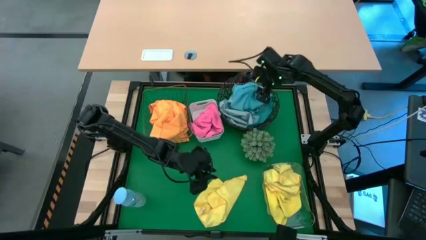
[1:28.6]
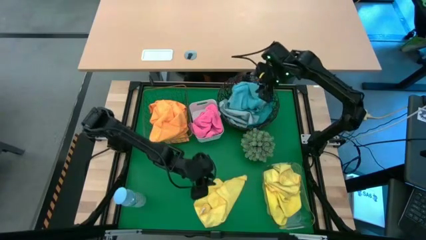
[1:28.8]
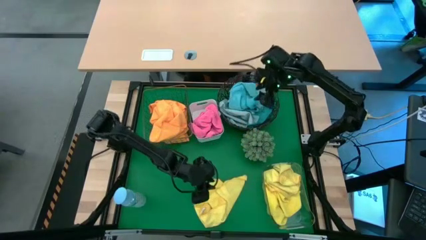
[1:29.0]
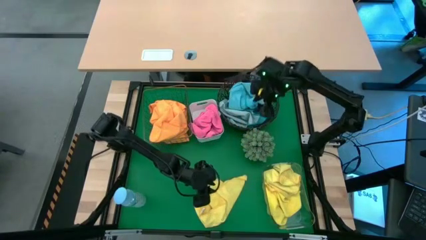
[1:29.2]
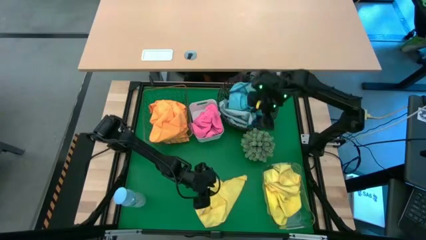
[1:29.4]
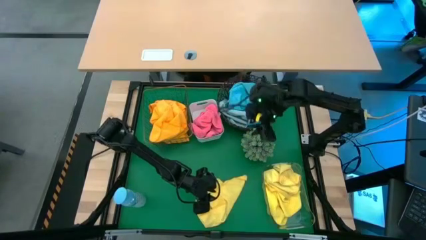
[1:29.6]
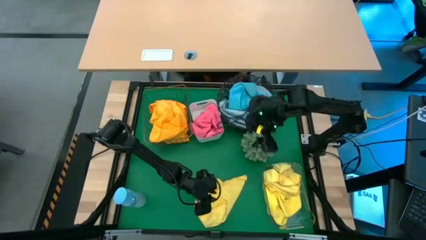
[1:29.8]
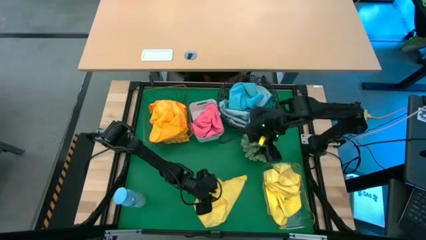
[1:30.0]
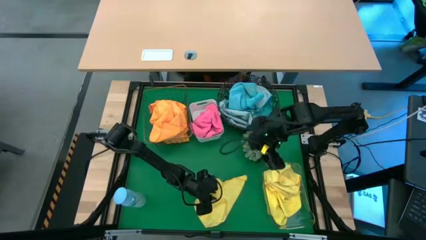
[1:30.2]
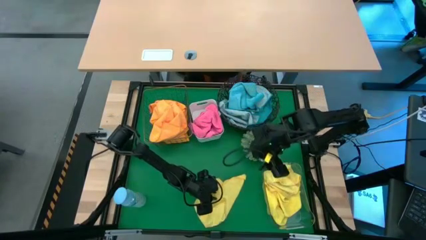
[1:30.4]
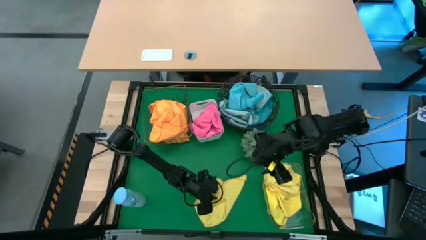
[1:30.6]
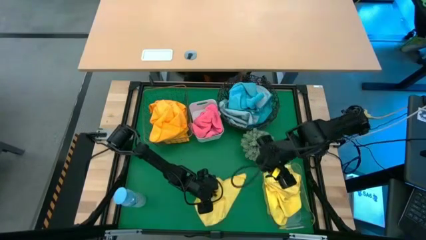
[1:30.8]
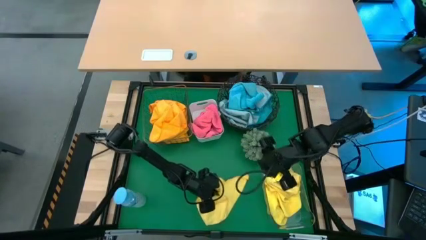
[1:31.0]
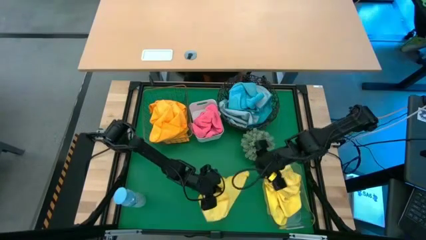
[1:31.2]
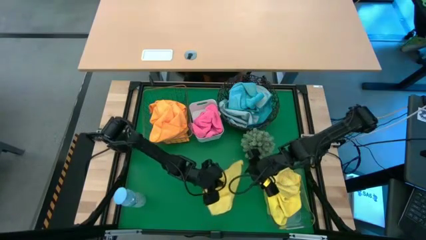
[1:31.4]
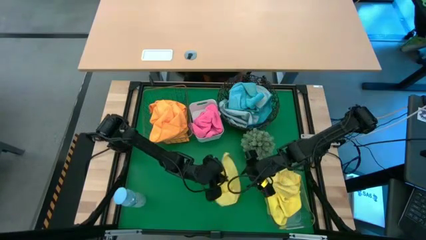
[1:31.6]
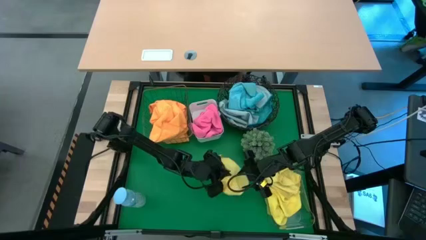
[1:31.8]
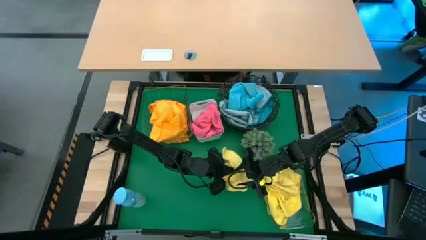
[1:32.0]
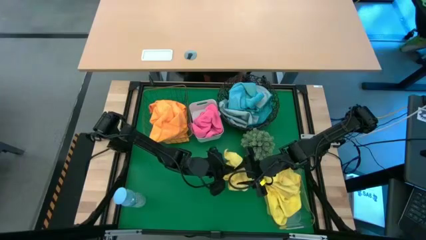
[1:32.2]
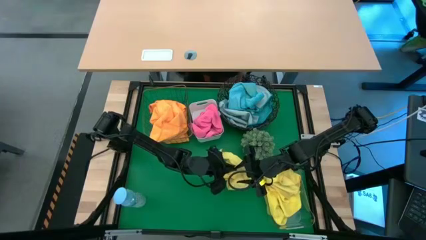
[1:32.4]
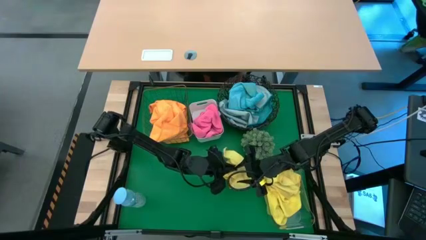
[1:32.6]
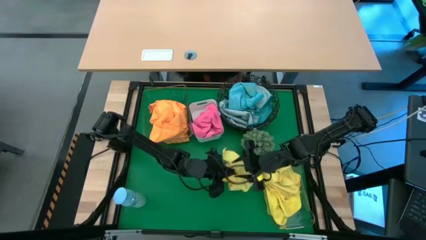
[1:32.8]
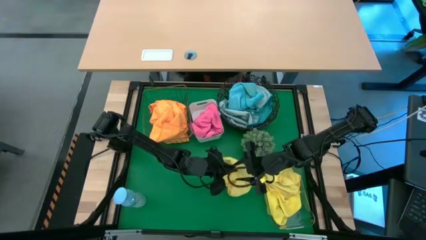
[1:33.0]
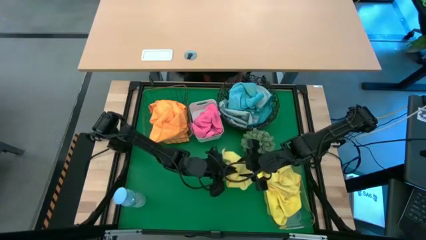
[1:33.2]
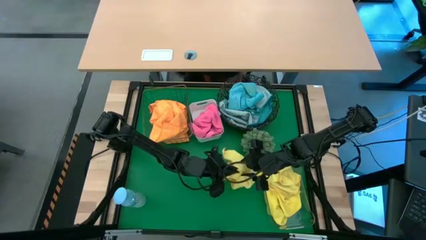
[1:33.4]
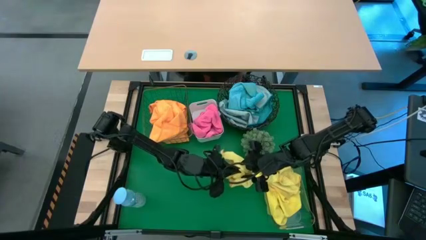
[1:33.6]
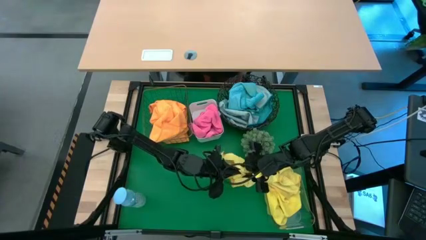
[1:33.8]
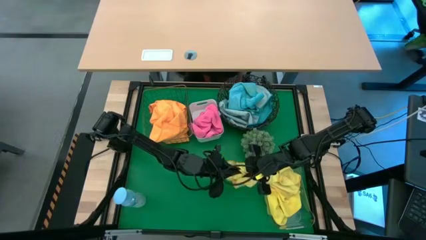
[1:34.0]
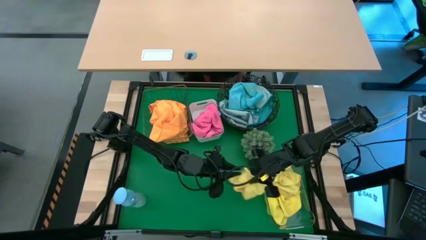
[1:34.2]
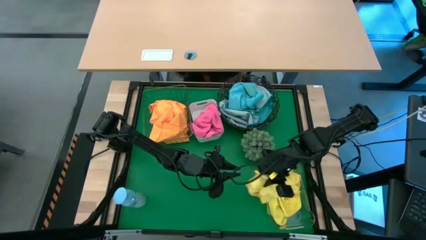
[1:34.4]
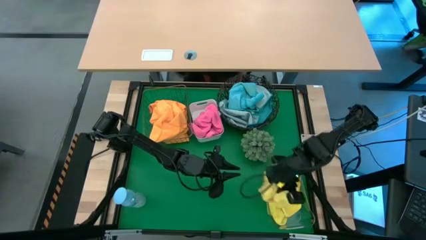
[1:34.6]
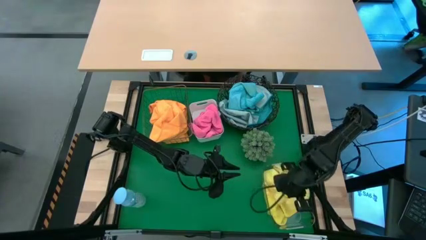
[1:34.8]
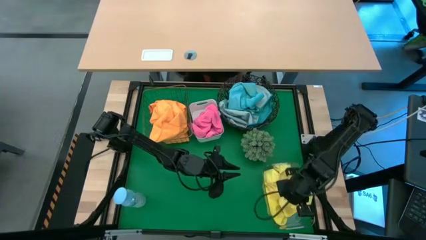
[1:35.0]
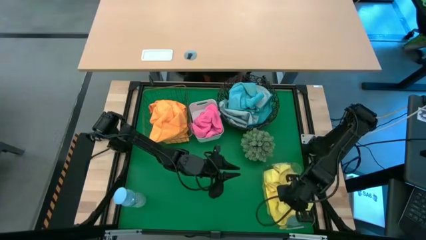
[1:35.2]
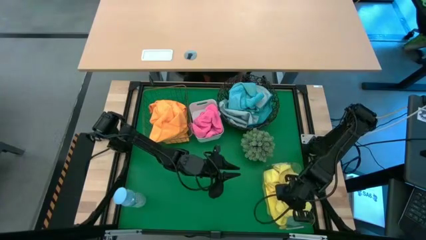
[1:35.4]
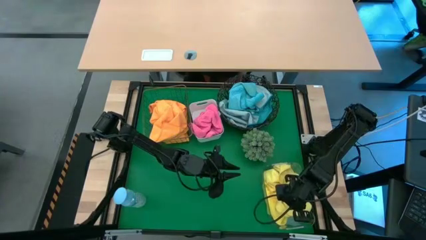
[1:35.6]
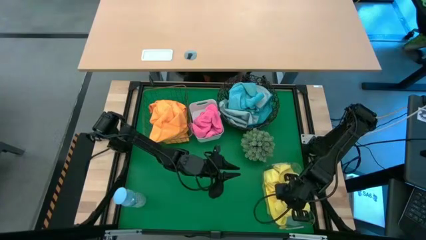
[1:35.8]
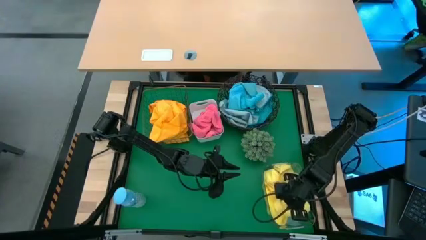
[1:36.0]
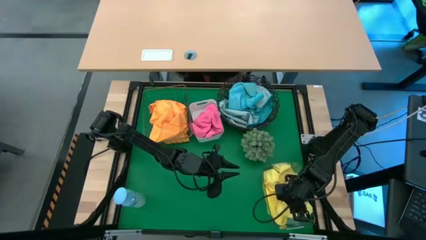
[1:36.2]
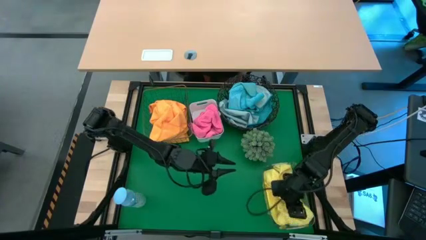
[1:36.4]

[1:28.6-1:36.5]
Task: Sort microfiber towel by color & place in baskets
Put the yellow microfiber towel into the transparent bin

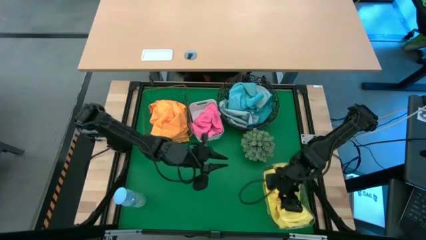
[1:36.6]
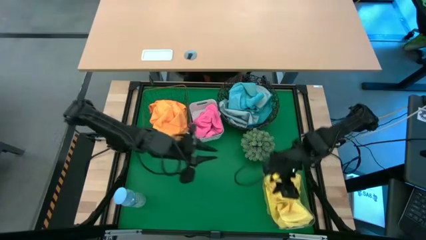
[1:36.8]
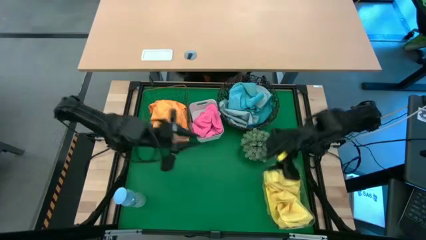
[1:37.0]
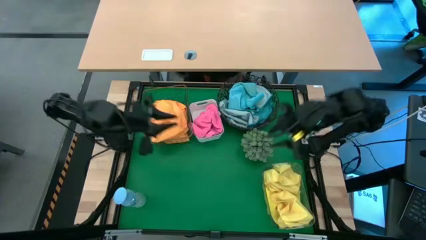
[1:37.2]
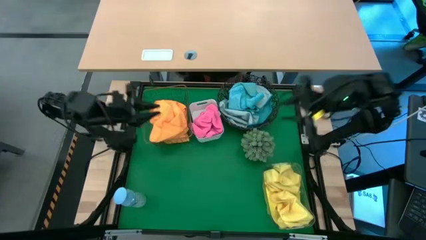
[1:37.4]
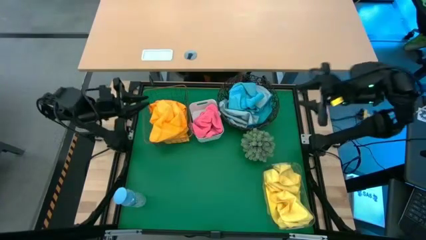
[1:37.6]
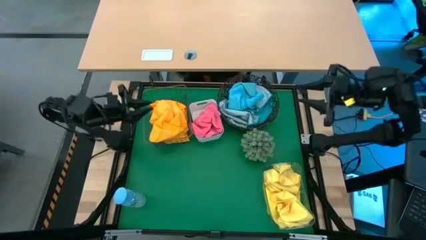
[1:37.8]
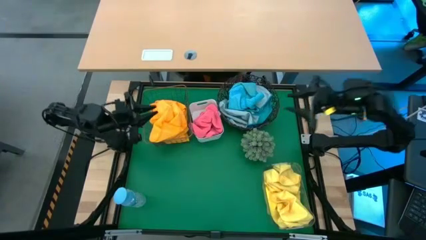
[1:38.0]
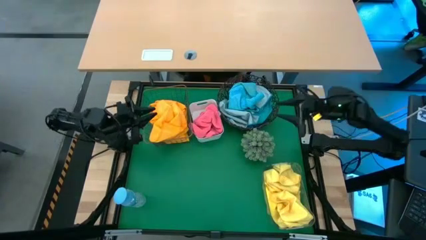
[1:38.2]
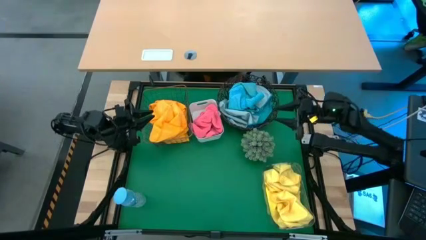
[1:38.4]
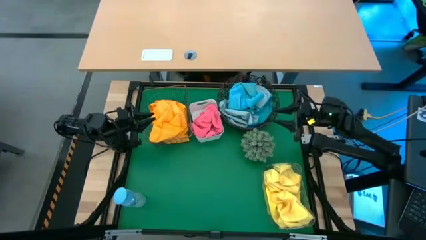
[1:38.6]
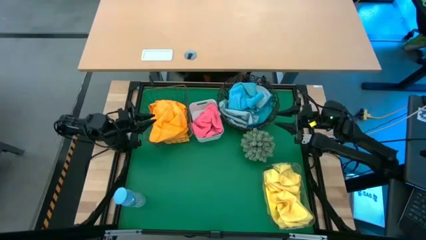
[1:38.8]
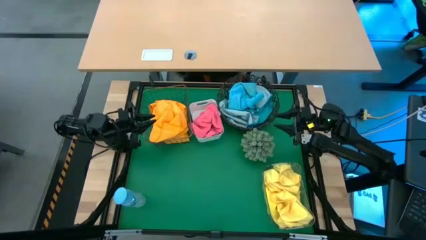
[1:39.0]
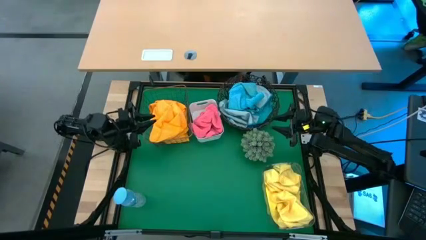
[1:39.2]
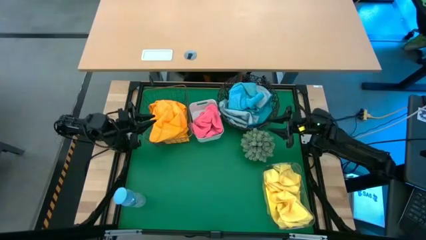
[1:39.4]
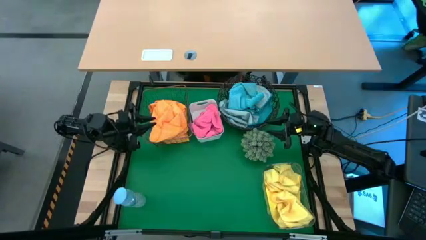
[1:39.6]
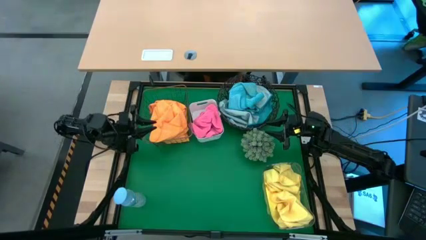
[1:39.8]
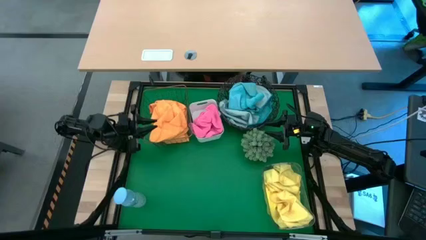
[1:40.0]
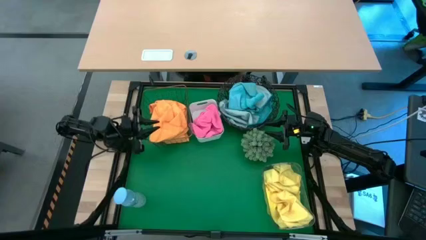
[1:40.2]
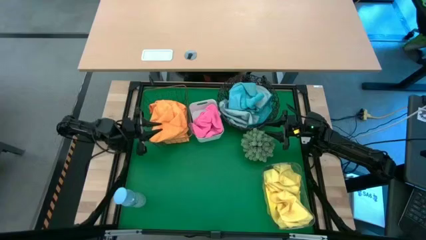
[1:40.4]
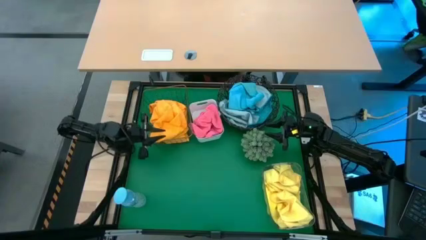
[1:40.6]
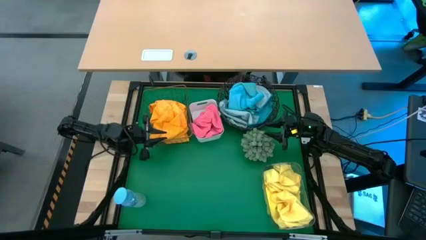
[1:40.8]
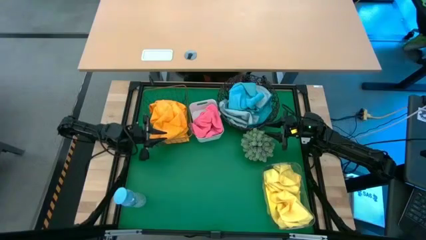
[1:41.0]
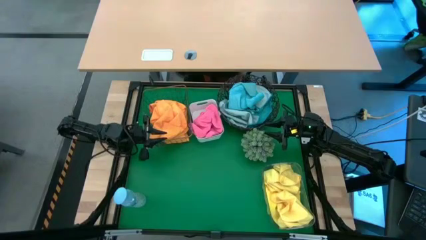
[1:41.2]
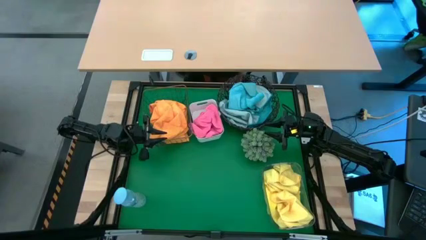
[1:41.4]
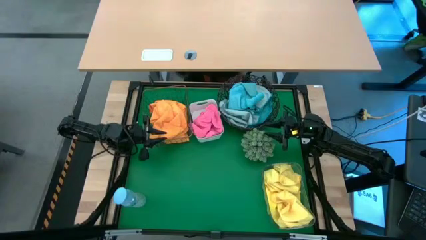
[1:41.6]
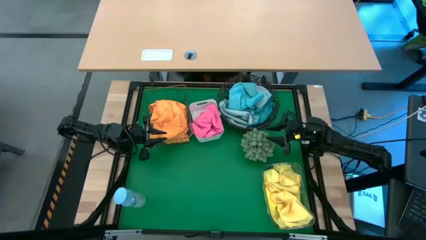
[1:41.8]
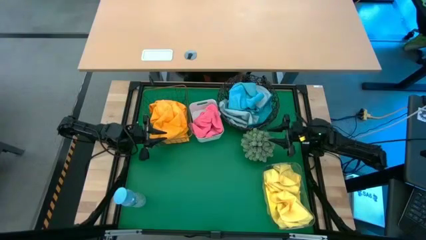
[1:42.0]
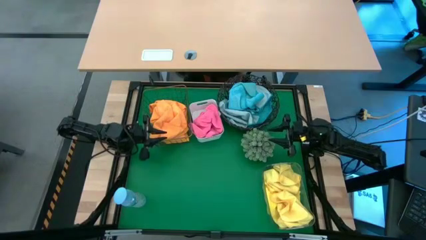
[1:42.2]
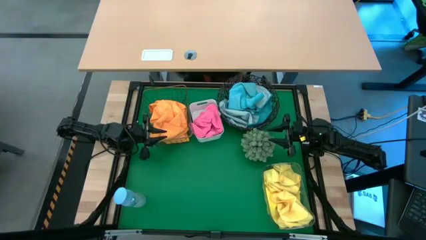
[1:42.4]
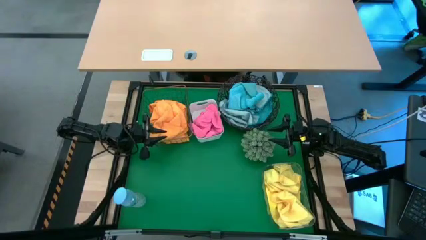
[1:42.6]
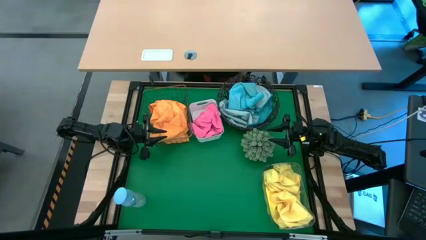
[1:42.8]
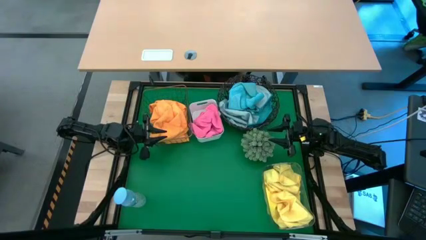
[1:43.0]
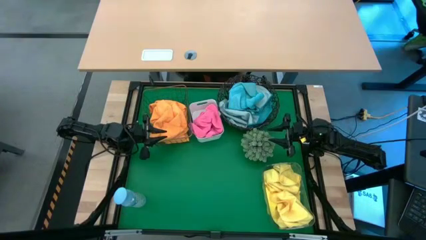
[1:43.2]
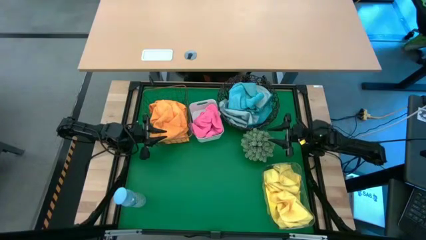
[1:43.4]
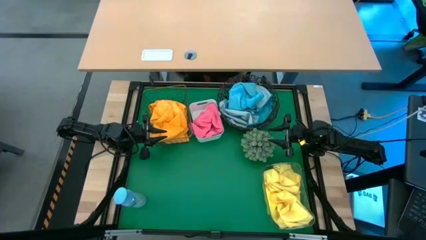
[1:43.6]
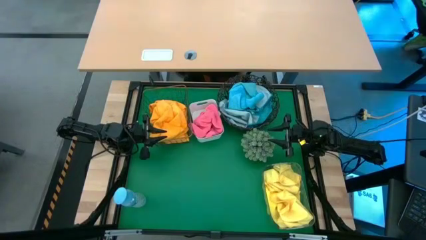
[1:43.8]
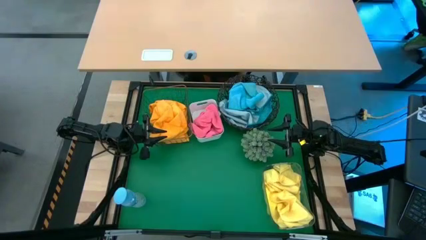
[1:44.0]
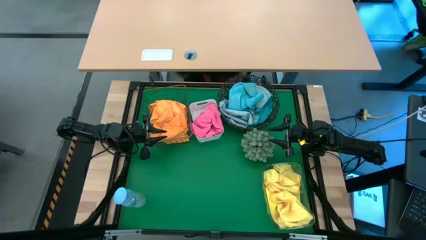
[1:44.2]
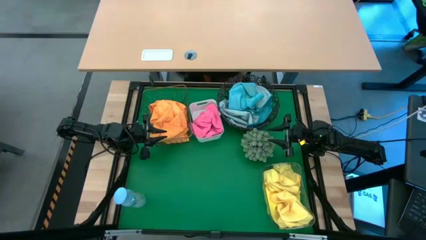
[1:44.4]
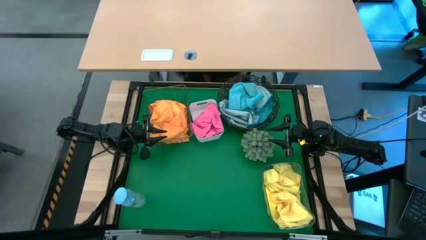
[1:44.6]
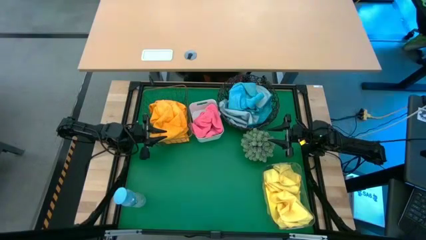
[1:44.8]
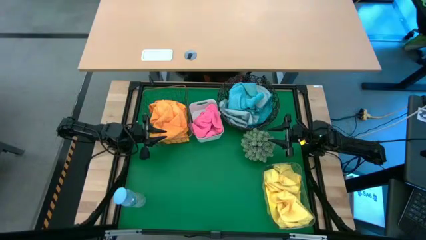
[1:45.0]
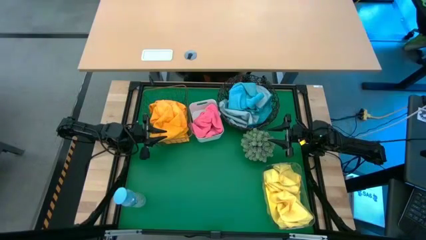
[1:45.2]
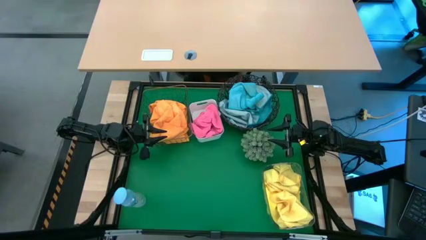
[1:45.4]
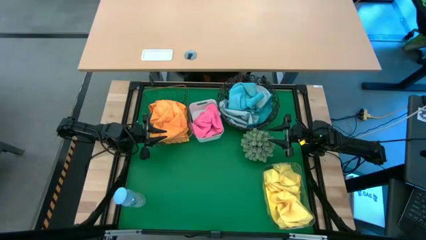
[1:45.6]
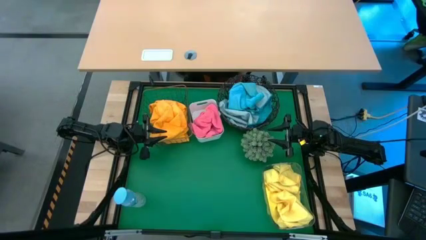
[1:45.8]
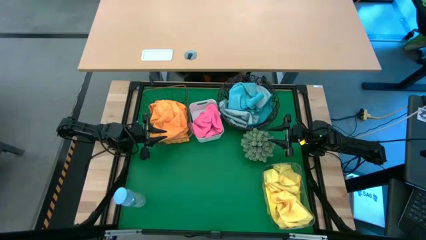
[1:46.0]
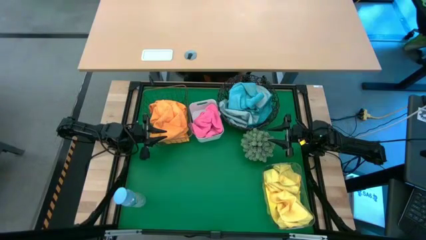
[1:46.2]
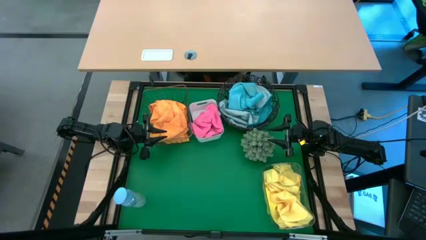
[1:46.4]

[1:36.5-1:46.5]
Return to Home Position
